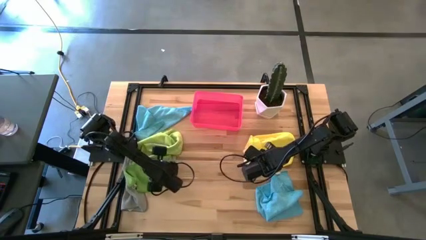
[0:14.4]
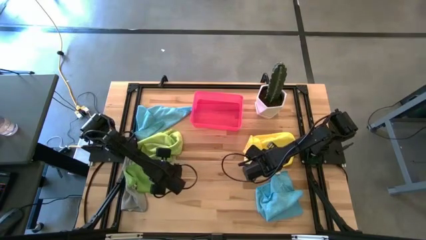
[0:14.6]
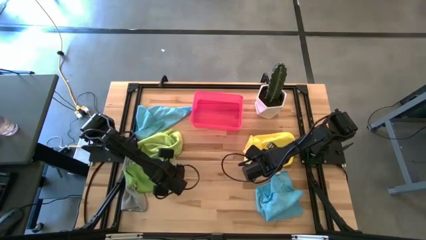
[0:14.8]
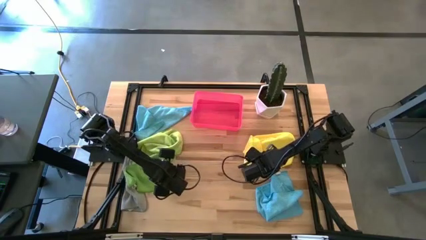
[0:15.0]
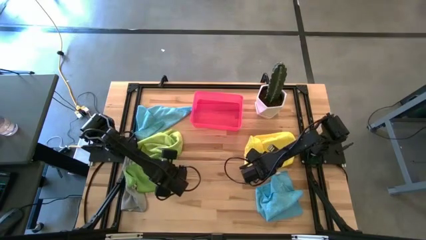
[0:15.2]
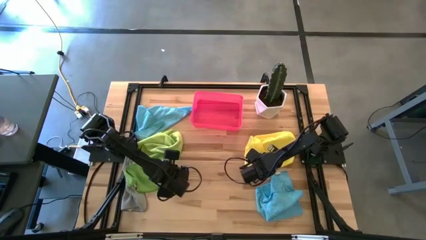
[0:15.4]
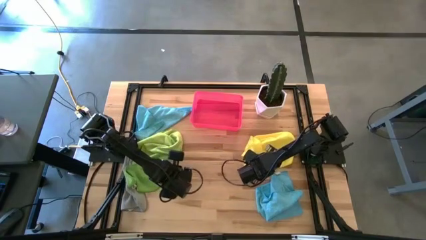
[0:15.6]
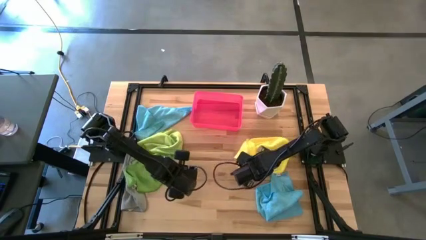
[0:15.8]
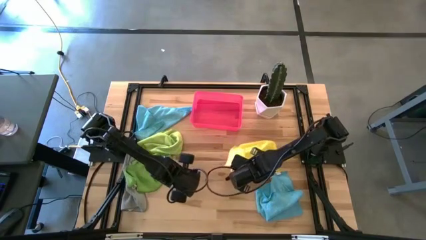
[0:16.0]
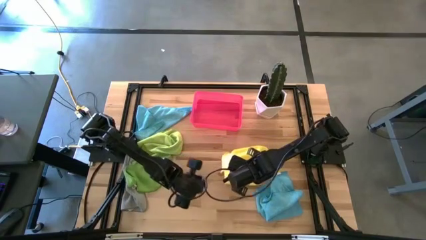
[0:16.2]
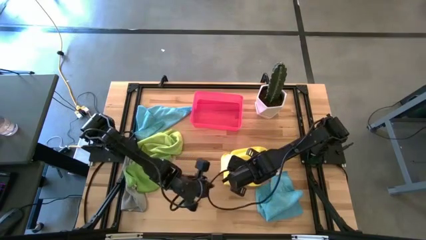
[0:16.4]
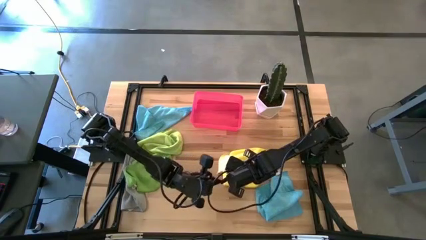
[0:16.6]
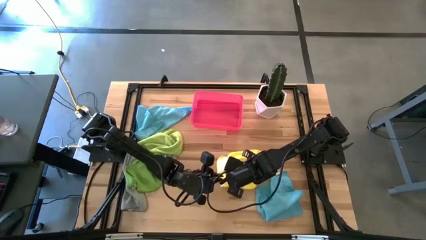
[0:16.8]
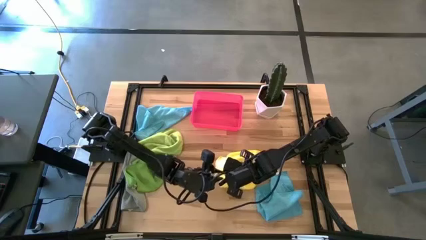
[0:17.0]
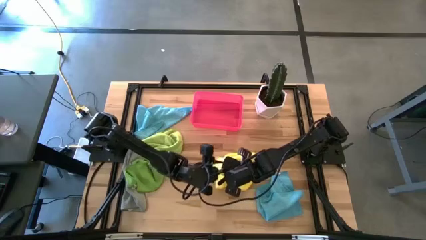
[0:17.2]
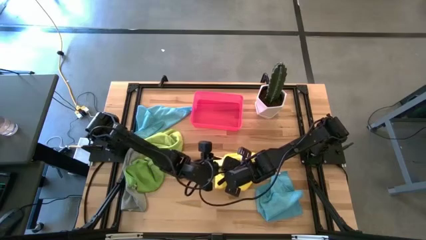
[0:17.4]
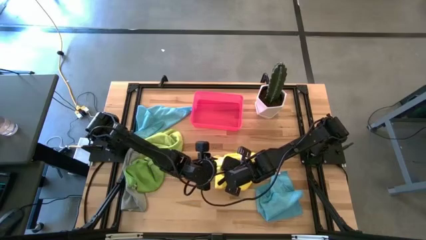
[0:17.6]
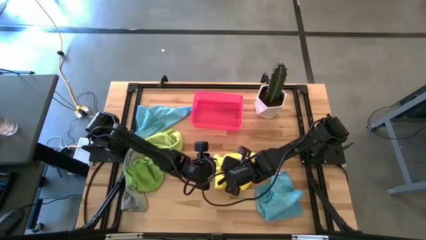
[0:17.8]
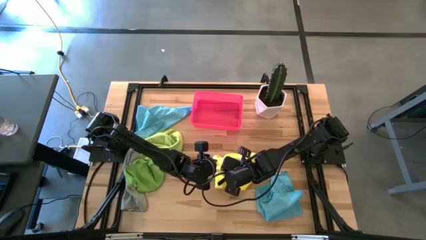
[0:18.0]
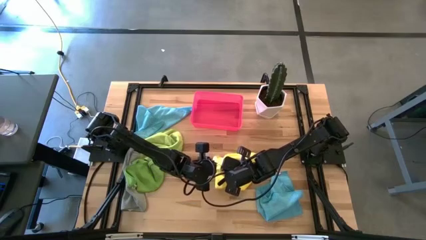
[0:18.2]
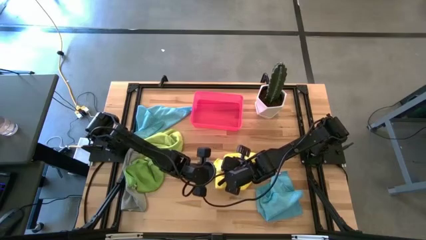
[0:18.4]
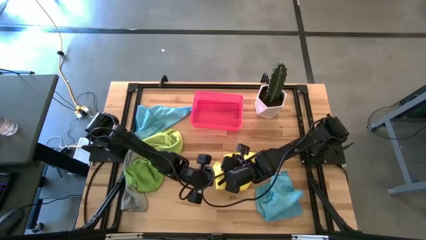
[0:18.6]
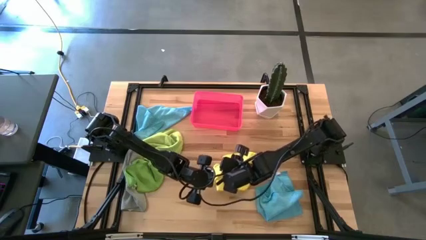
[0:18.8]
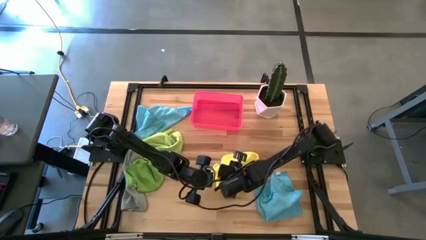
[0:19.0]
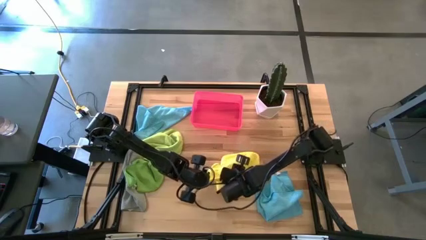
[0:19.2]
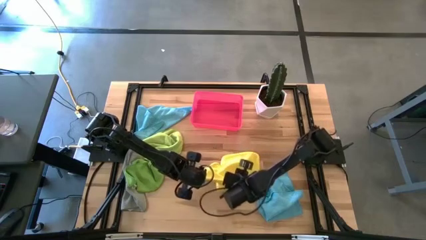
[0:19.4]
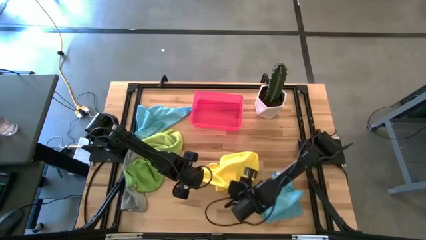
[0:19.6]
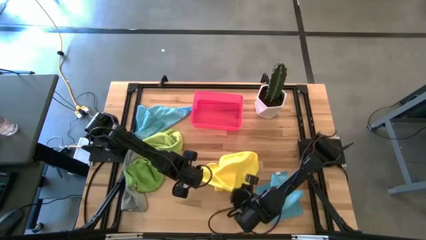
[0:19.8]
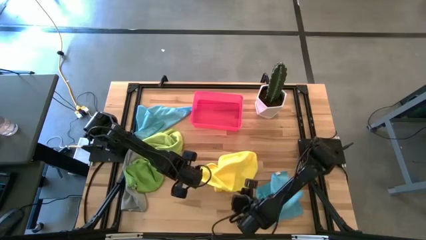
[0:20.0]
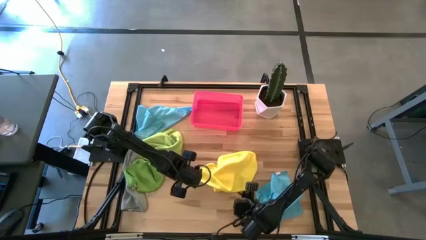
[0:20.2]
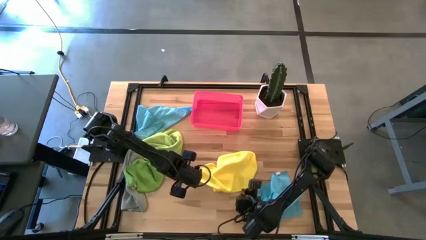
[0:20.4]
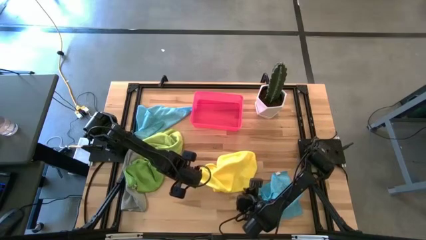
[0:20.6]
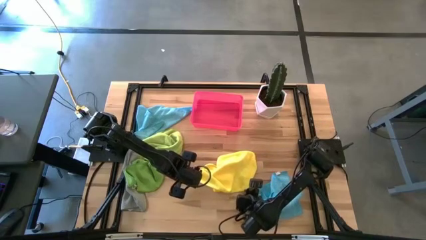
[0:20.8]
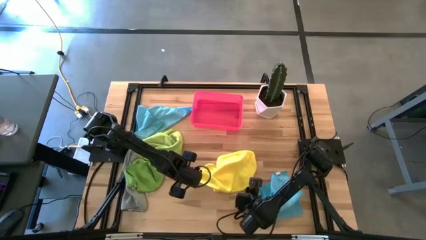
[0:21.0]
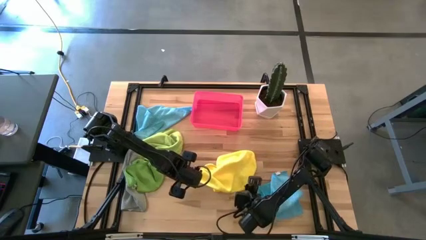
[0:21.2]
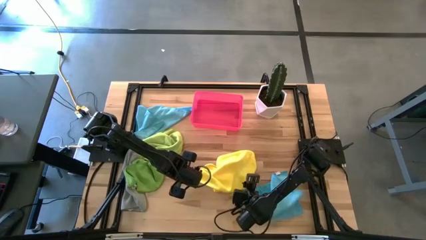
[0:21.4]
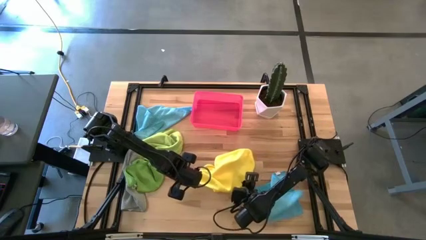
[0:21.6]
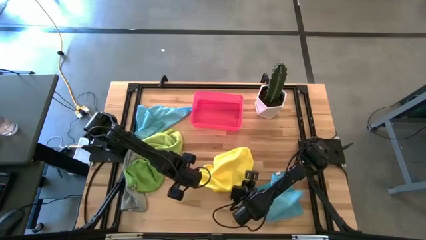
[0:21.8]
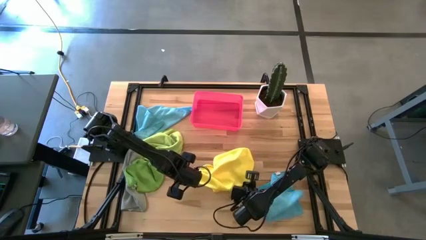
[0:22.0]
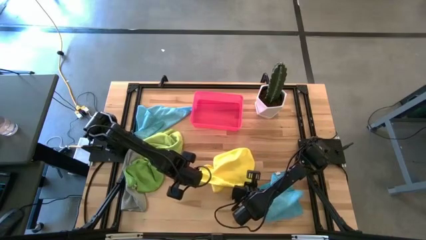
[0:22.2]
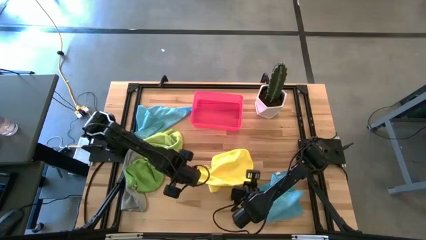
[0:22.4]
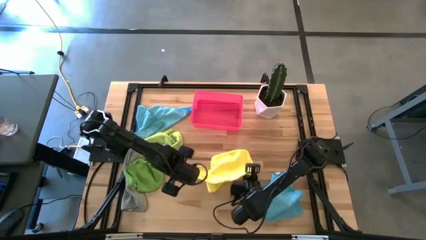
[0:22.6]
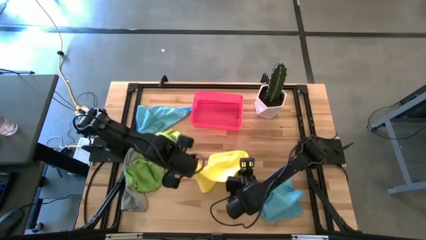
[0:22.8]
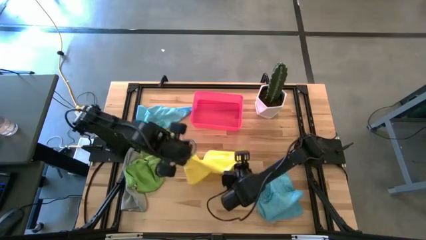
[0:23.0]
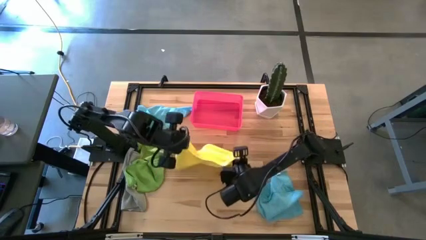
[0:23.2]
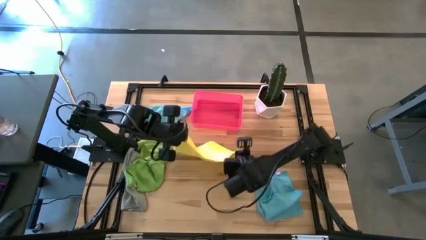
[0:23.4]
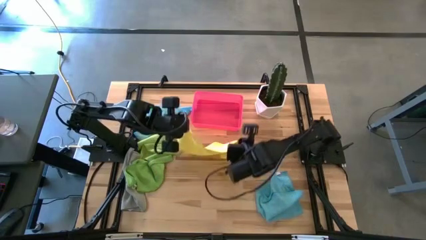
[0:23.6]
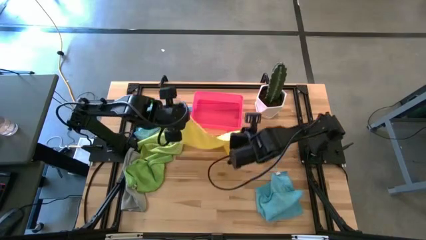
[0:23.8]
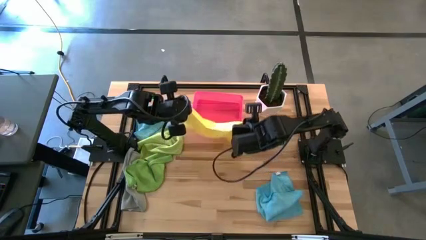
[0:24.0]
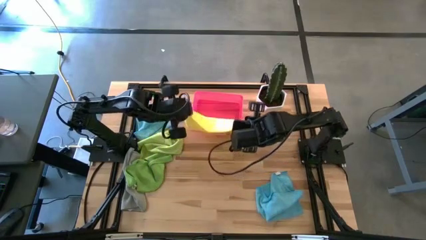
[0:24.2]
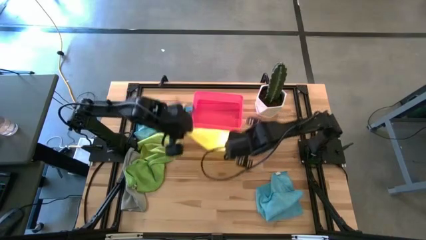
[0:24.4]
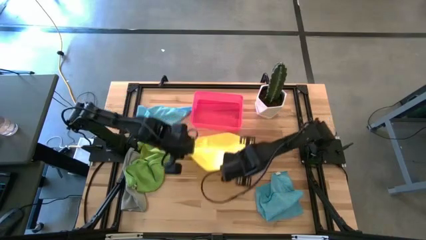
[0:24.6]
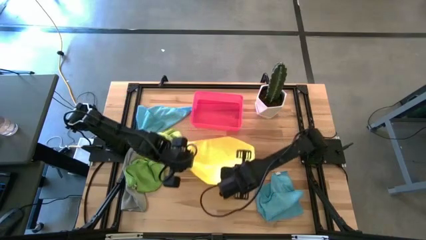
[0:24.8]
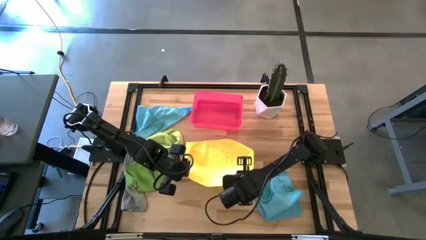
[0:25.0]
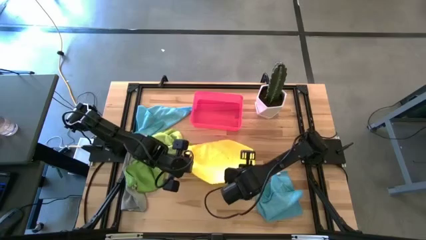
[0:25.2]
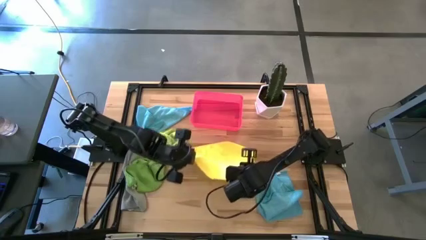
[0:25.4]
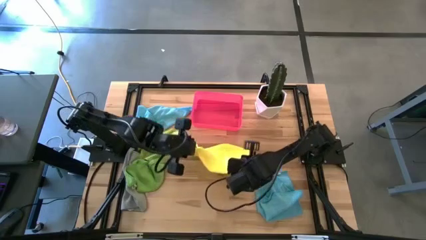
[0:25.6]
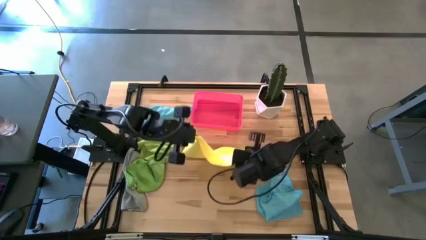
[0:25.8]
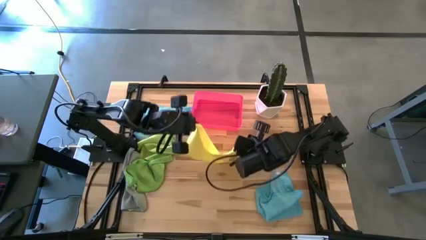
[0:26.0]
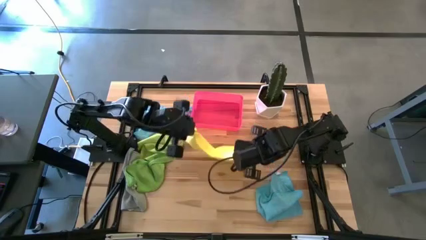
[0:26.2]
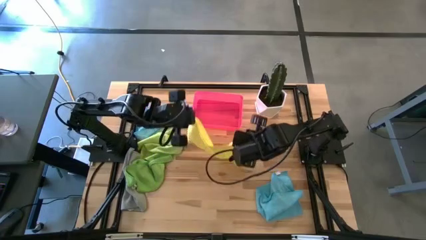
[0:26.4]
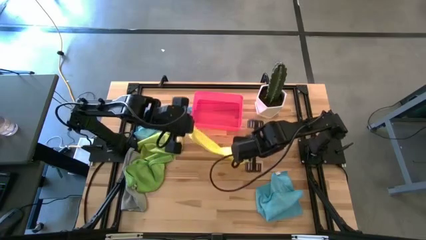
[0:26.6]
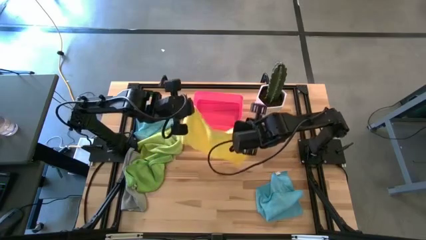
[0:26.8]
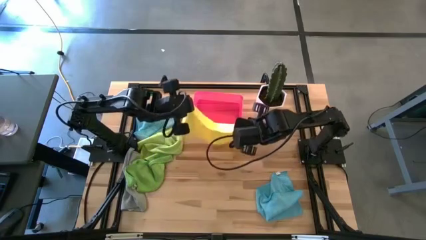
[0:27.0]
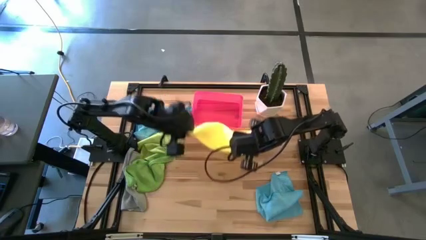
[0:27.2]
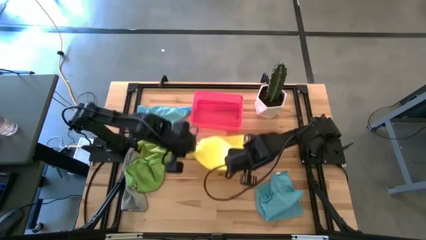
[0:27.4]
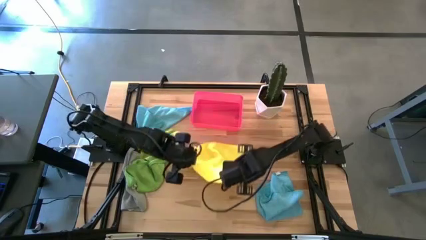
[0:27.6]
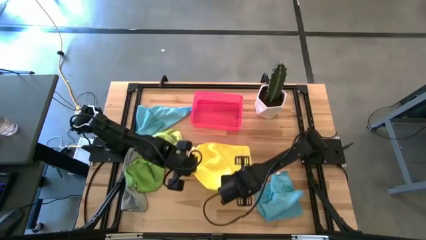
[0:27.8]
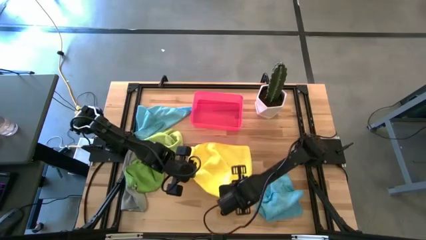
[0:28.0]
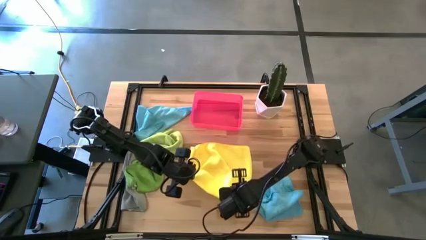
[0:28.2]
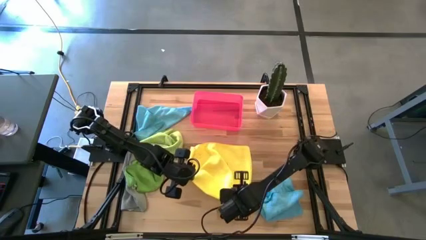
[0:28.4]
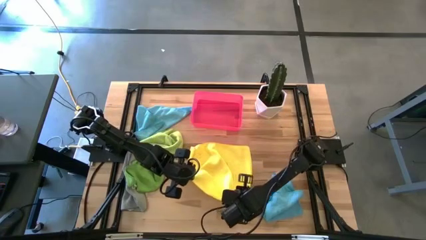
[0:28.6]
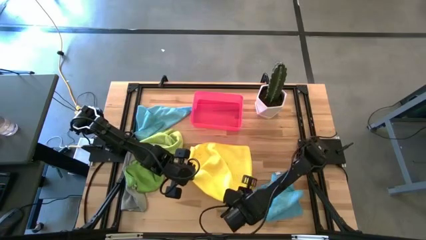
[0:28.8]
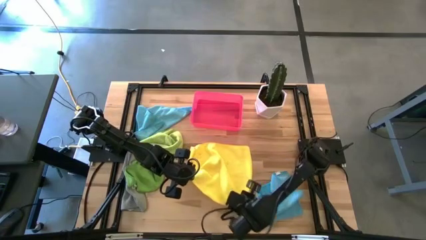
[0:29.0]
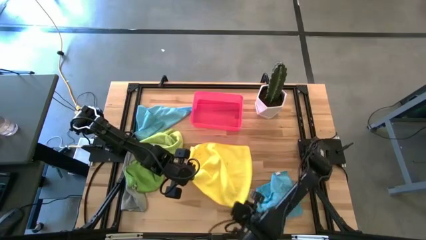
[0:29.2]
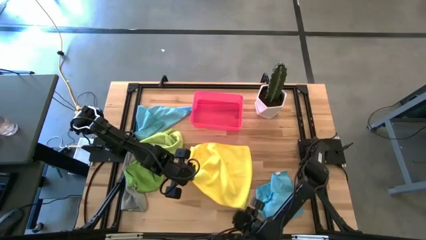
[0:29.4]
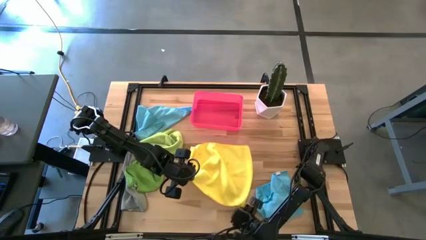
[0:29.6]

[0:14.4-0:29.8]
Task: Fold microfiber towels
Fold the yellow microfiber cloth on the table
